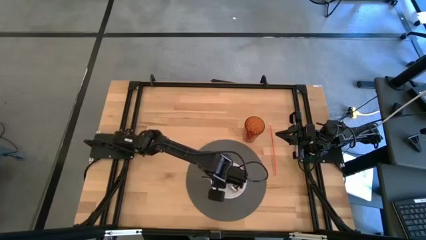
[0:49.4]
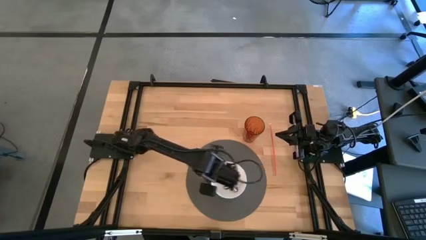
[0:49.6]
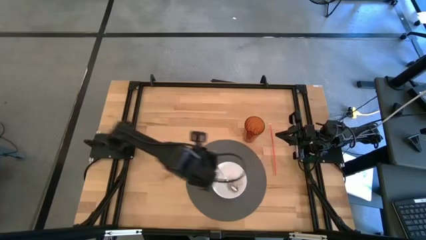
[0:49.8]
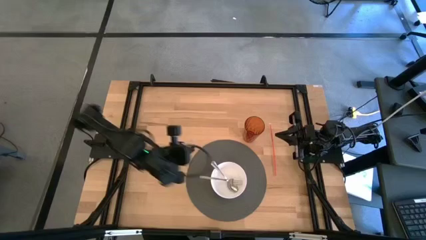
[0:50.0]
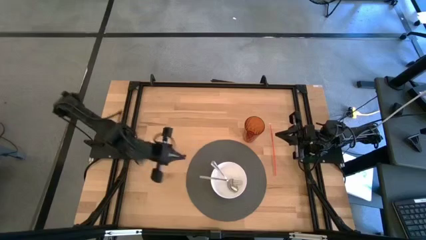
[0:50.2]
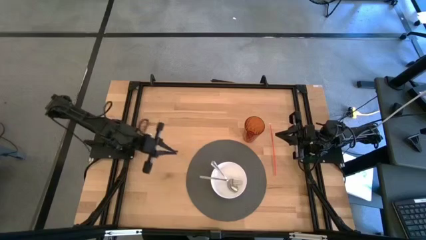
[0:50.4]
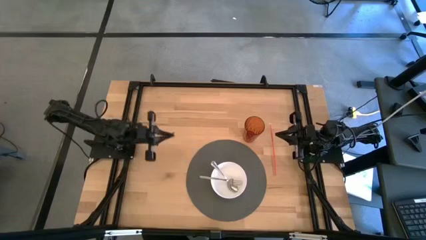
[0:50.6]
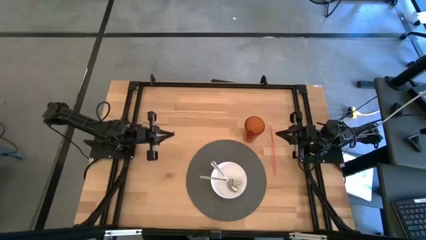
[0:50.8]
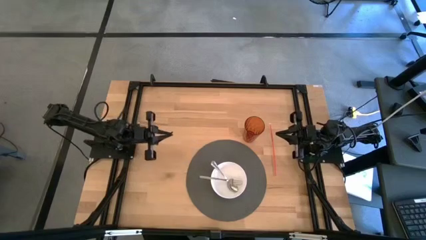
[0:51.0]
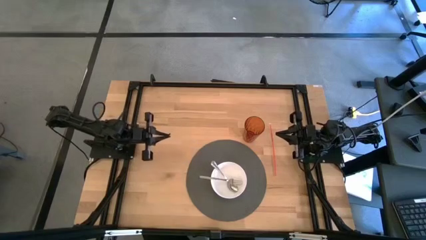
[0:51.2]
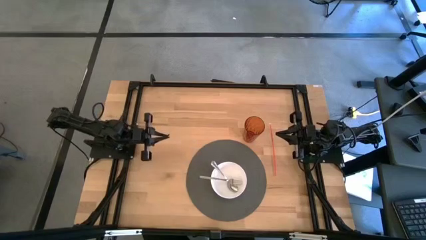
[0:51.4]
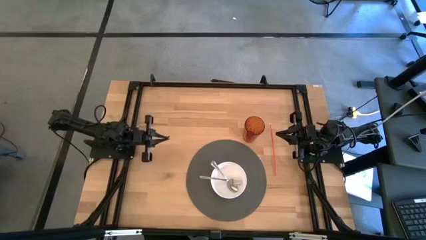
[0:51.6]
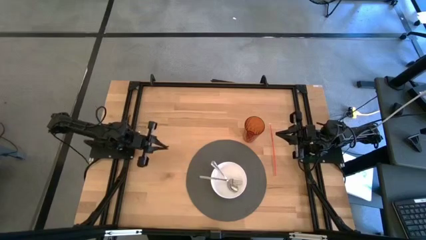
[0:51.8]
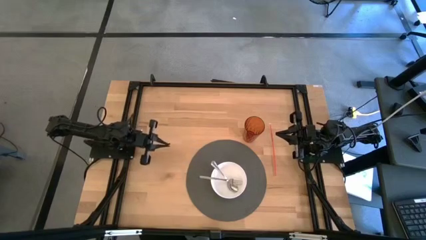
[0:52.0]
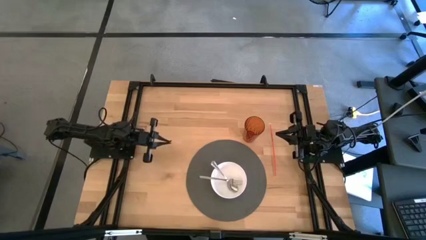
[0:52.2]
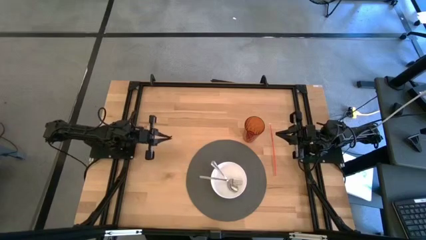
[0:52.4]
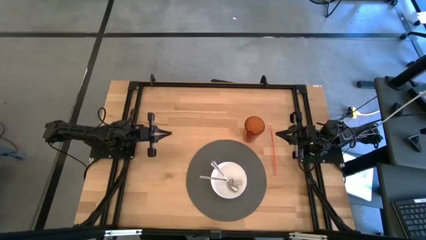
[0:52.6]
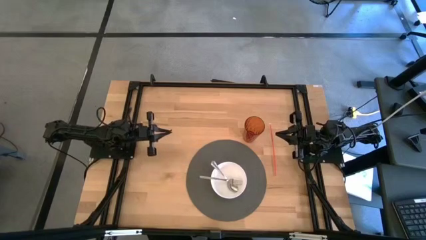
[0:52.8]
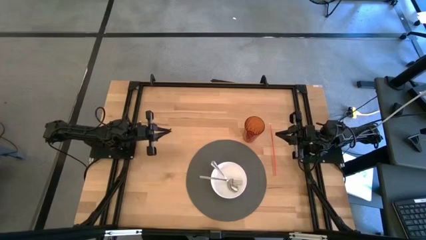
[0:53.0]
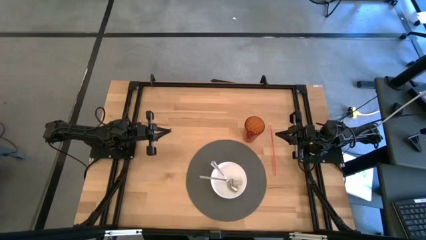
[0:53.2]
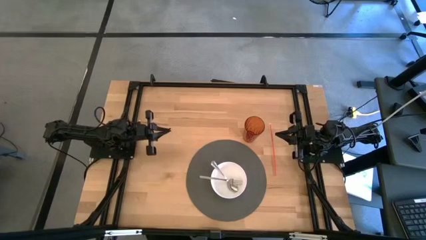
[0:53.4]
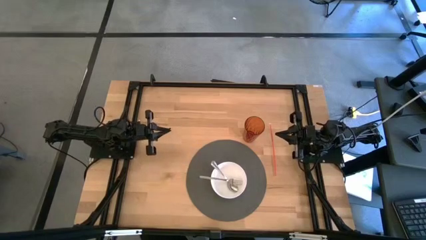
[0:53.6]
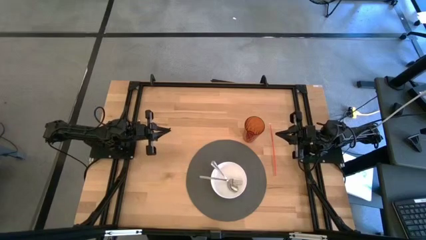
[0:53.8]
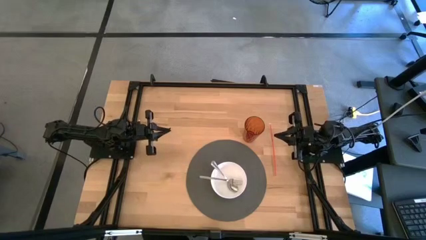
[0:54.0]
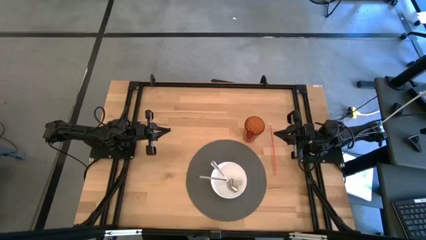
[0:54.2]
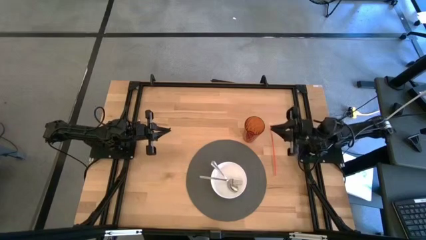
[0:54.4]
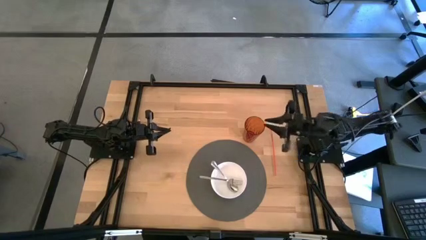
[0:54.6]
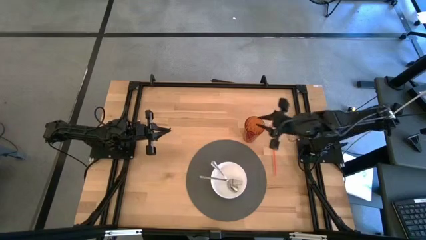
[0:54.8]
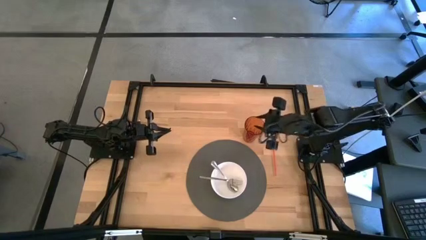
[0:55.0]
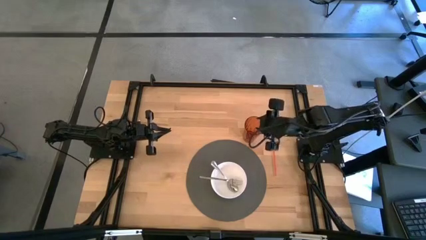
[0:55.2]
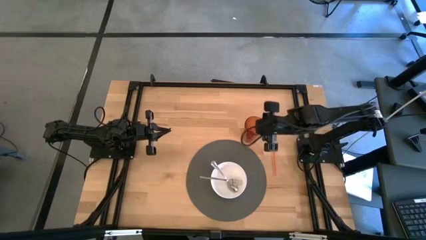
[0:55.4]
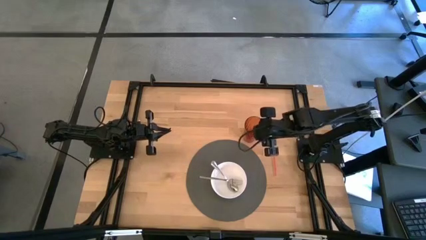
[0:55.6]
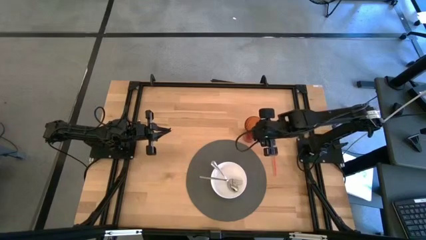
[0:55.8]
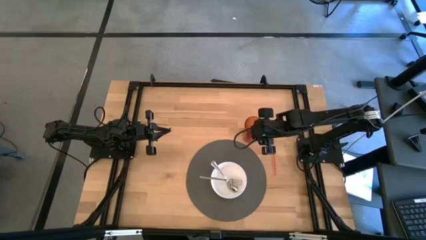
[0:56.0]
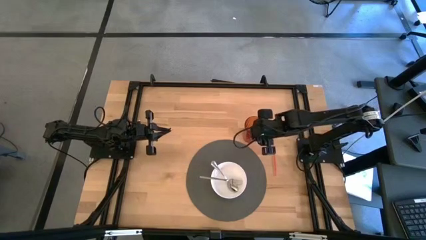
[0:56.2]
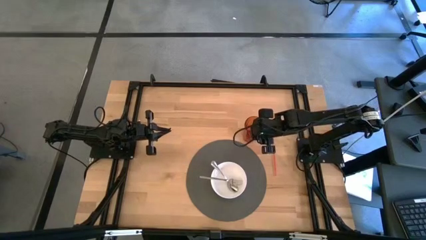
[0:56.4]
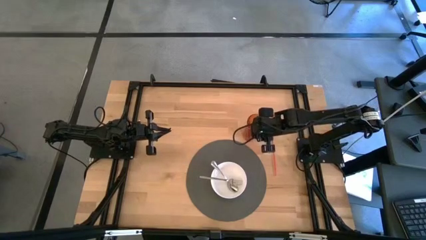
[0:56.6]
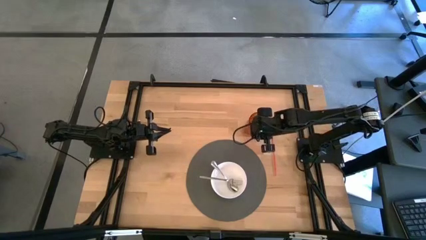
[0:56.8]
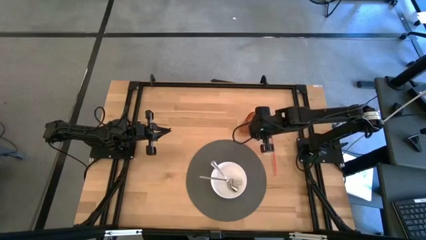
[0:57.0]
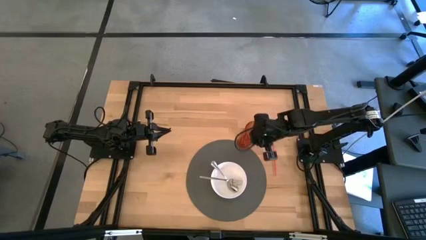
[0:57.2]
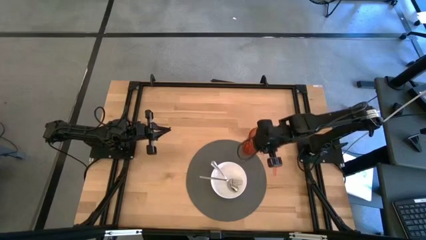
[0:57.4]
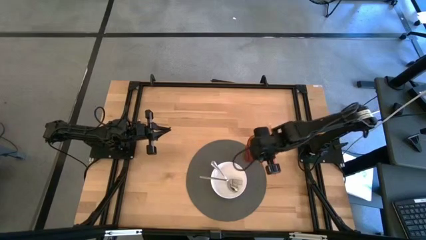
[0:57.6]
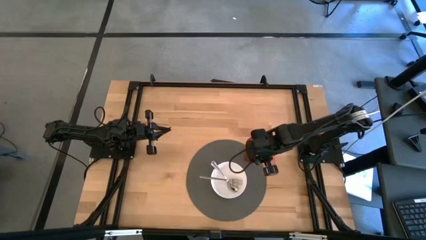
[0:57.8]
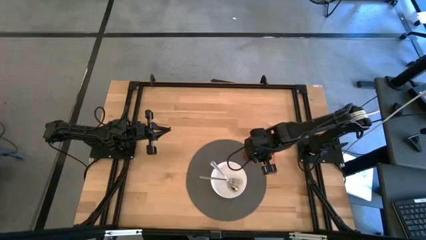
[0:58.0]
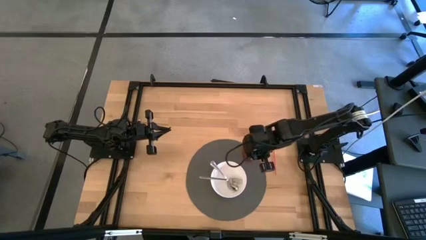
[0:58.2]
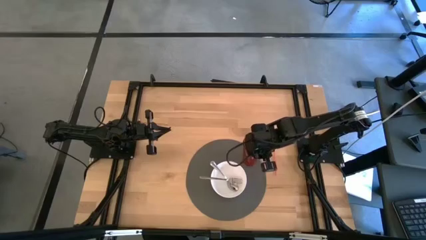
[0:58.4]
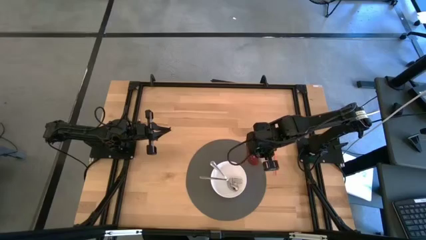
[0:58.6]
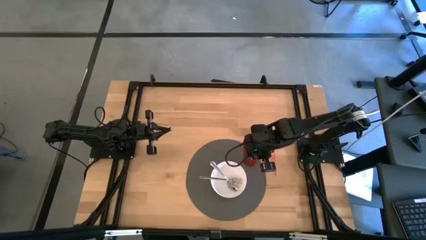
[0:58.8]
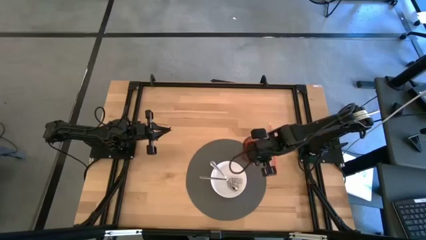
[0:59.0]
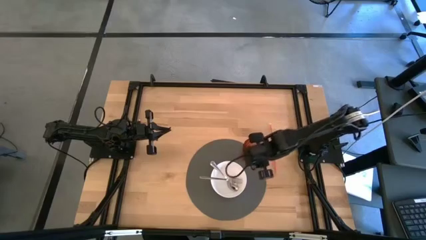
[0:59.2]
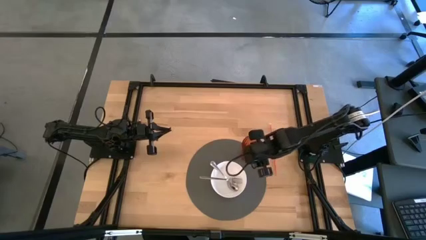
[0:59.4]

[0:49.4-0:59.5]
Task: Pick & Place Utensil
Put the orange cup on the gray mat

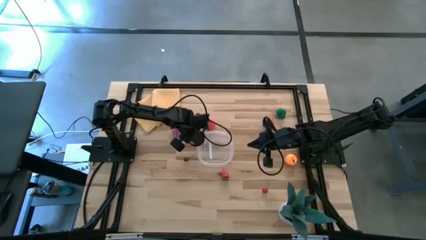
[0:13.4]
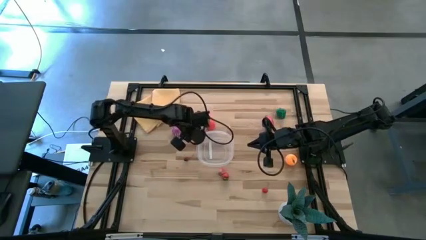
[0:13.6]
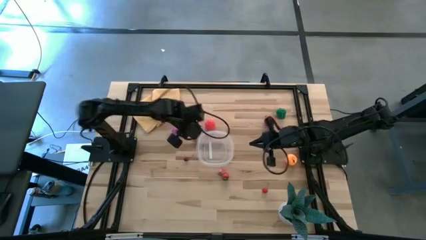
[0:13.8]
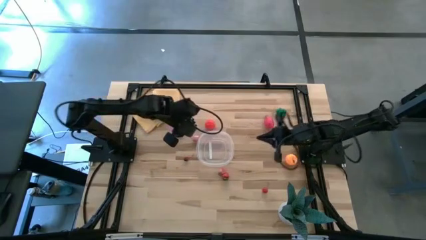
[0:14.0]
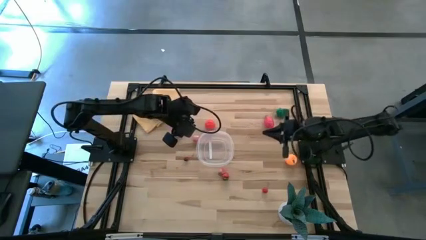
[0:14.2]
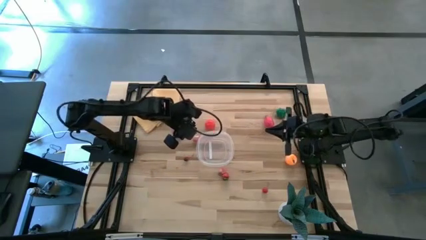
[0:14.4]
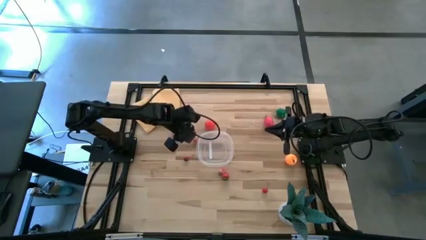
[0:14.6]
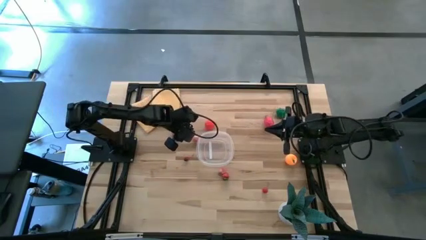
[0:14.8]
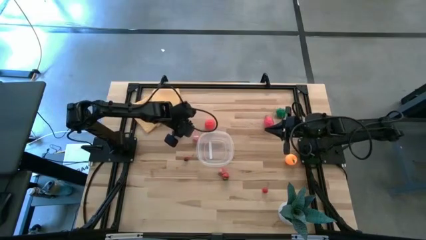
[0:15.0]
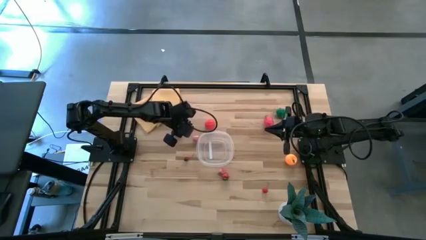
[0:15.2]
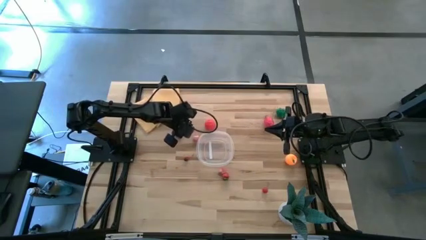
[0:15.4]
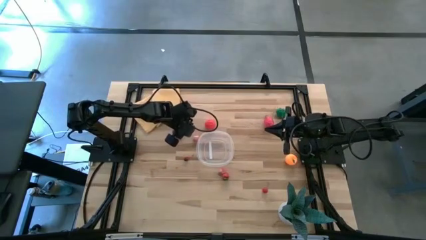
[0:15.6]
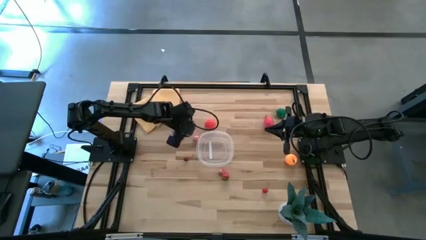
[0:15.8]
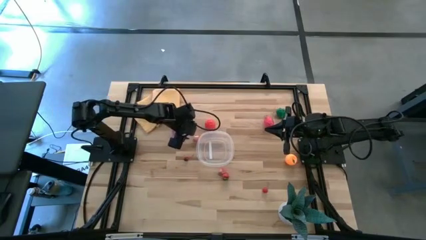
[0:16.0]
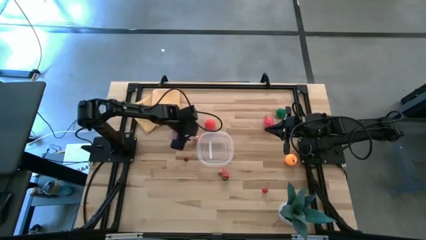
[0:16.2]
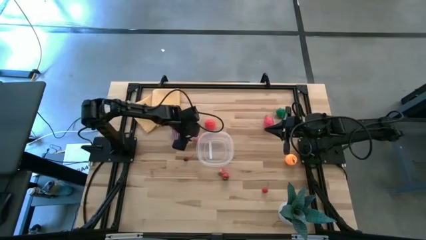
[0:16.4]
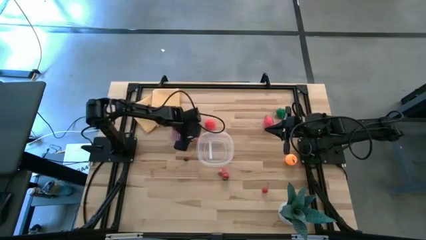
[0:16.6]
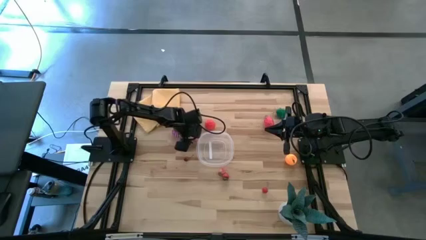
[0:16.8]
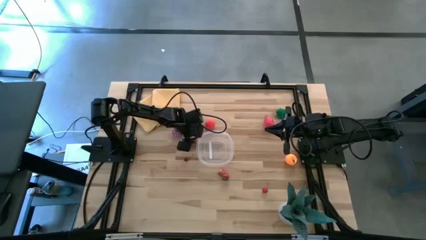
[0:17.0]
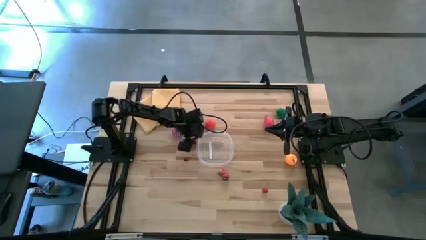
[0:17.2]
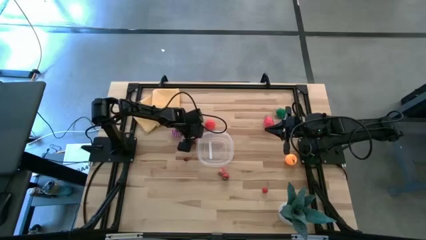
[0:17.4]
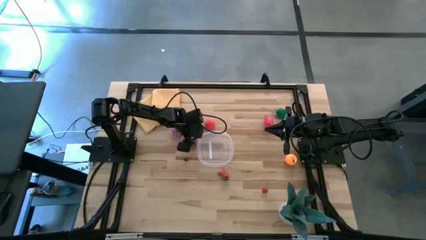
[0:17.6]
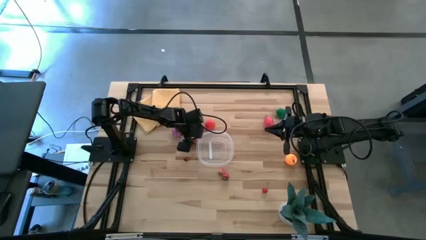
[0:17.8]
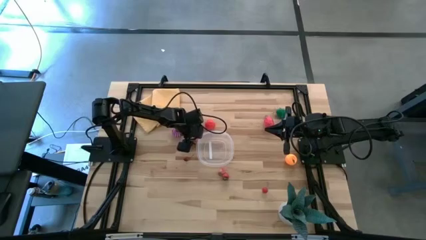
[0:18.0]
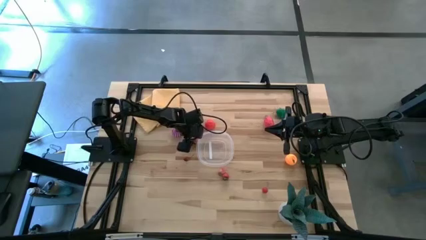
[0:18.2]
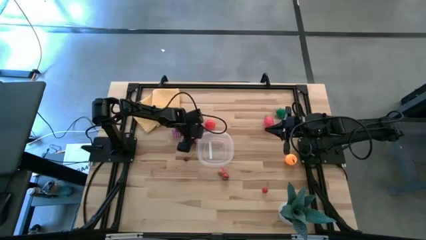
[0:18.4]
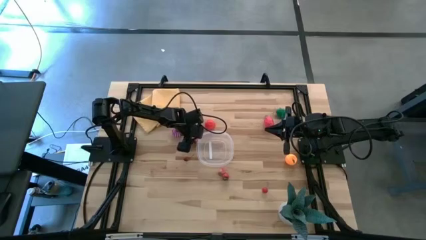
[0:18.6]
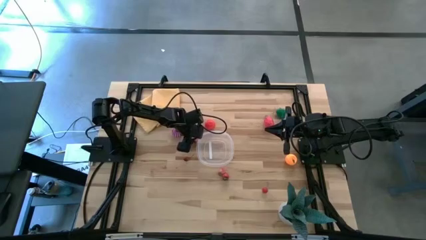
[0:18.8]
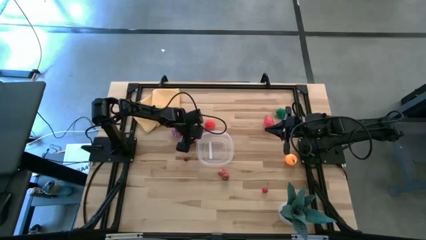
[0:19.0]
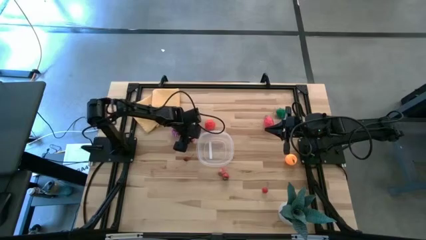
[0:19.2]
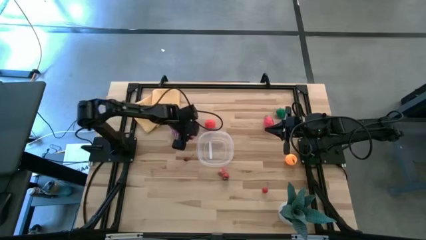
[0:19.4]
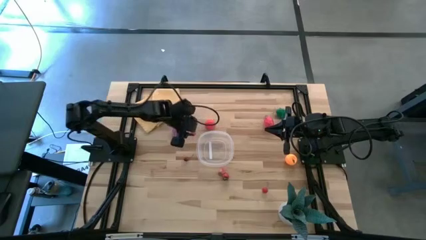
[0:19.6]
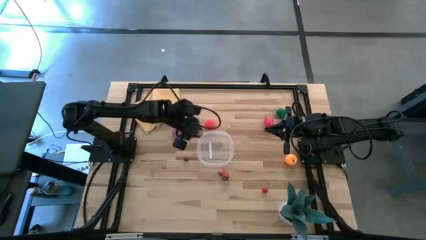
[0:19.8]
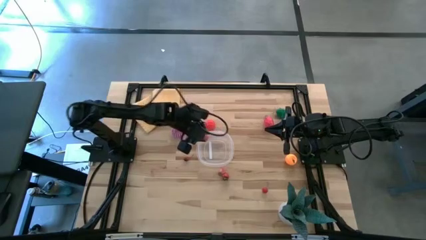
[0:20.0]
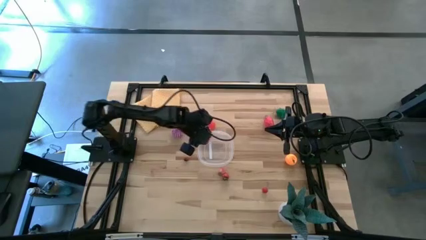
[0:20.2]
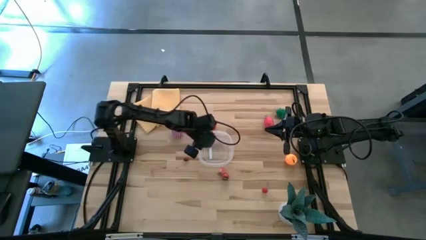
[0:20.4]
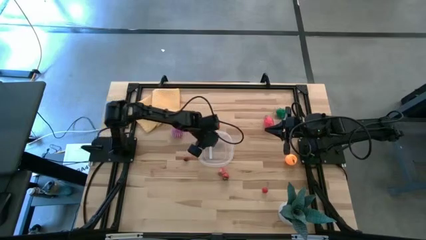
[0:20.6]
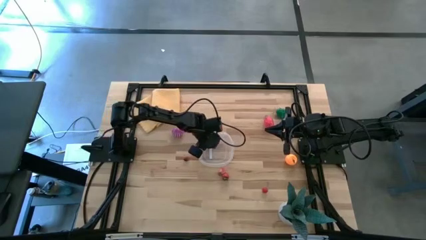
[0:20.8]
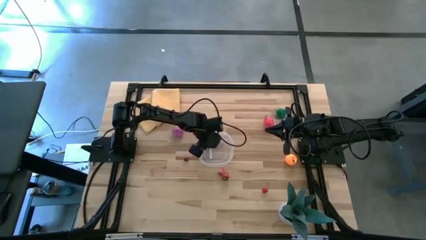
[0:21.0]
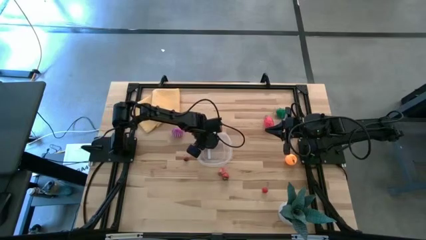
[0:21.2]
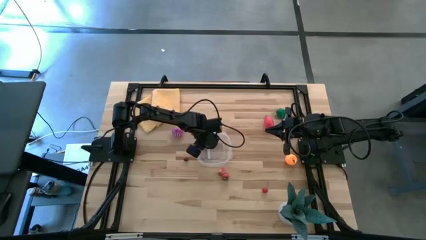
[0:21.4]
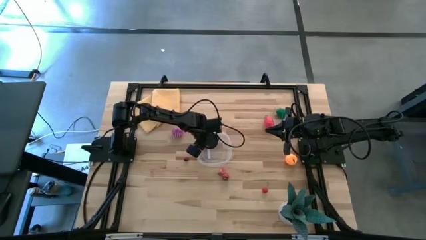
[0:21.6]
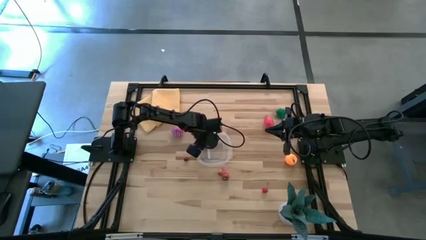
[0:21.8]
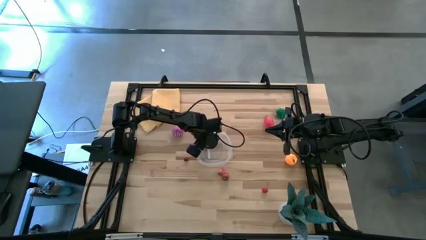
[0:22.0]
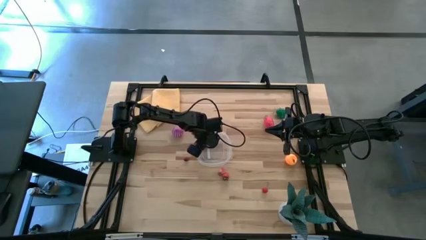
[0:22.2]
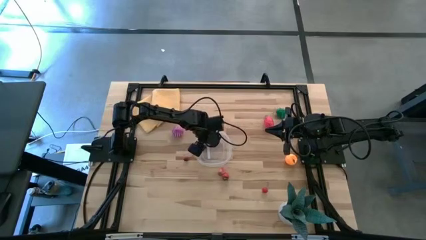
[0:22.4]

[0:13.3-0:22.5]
Task: Pick and placing Produce into tupperware
Put the top peach into the transparent bin
